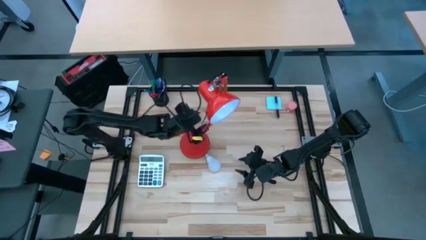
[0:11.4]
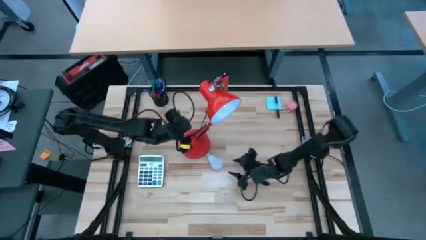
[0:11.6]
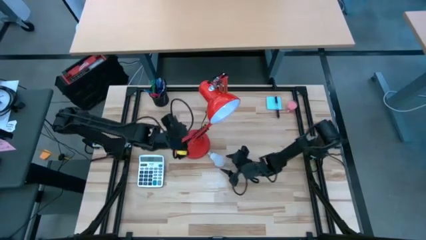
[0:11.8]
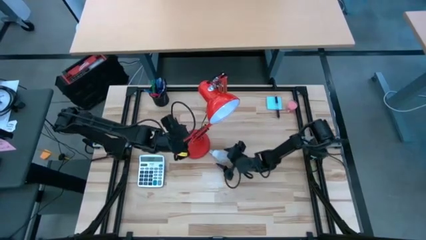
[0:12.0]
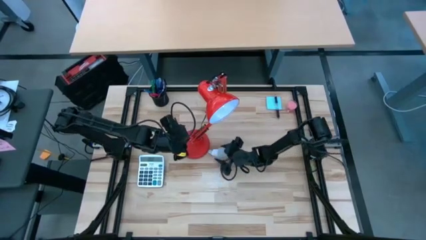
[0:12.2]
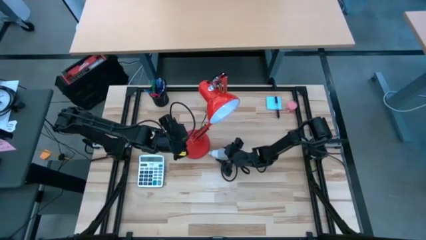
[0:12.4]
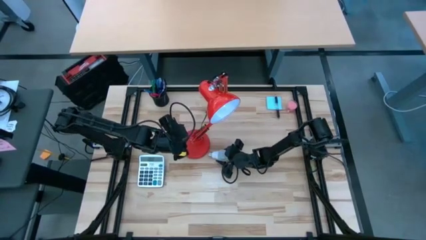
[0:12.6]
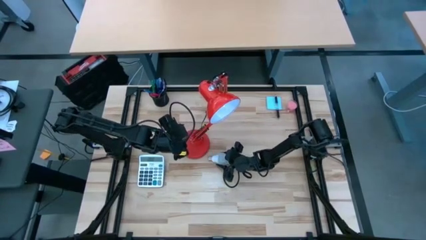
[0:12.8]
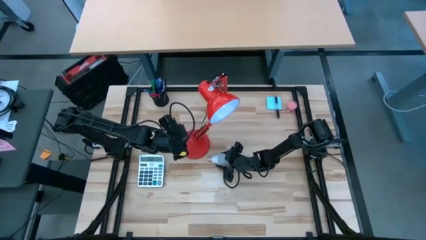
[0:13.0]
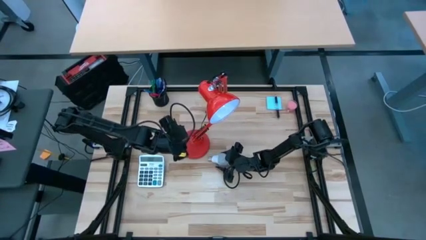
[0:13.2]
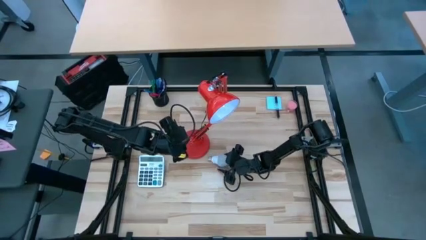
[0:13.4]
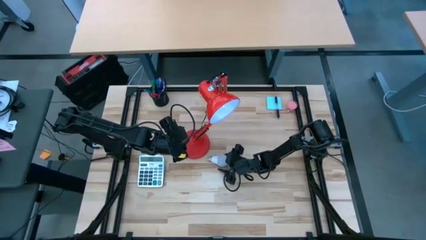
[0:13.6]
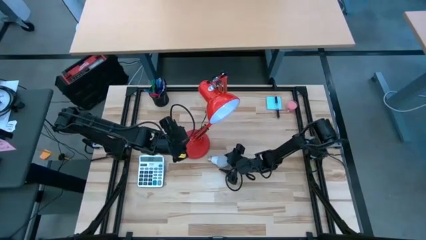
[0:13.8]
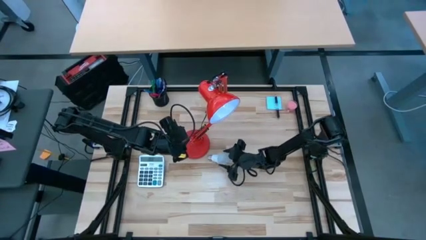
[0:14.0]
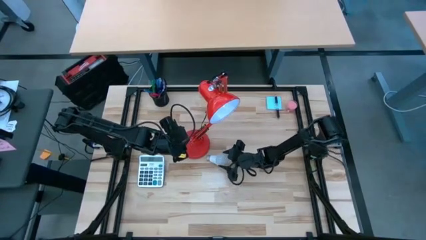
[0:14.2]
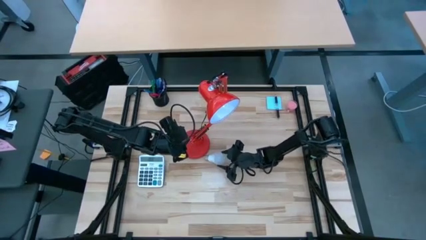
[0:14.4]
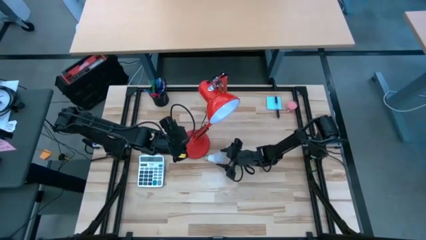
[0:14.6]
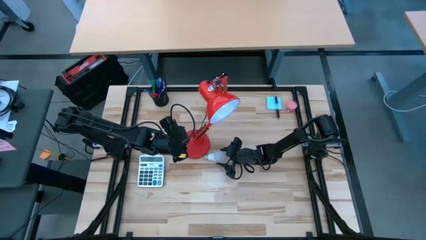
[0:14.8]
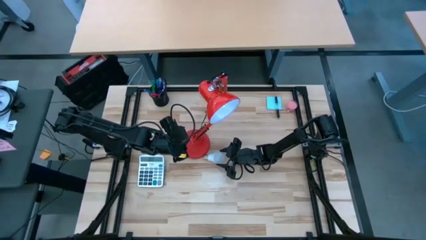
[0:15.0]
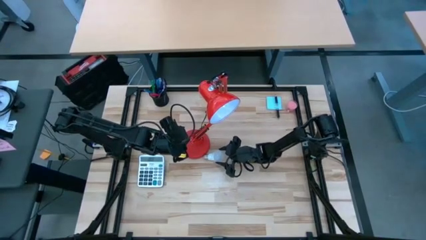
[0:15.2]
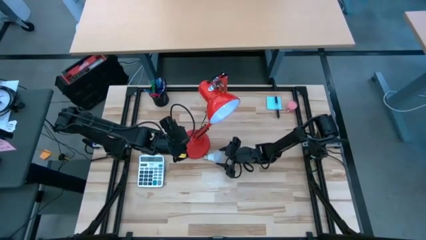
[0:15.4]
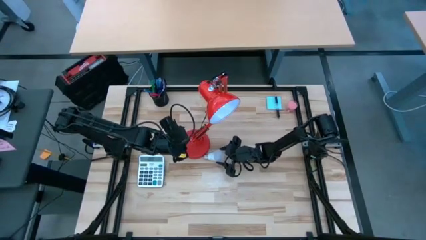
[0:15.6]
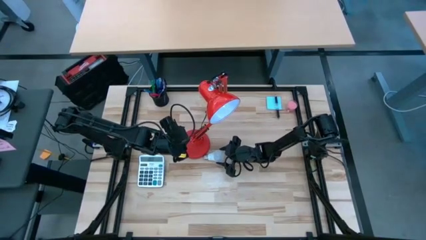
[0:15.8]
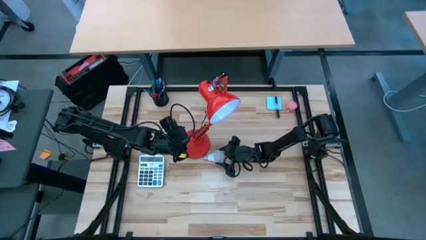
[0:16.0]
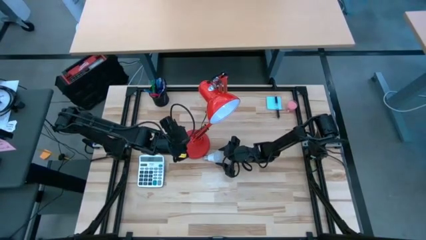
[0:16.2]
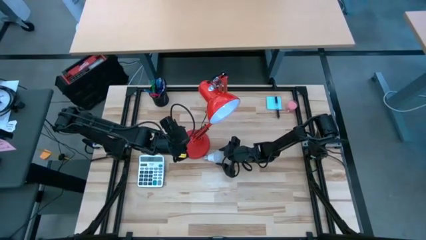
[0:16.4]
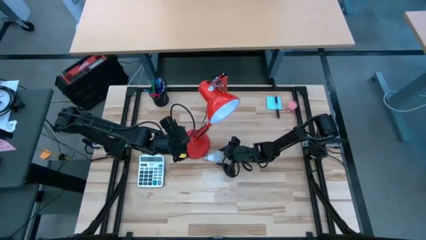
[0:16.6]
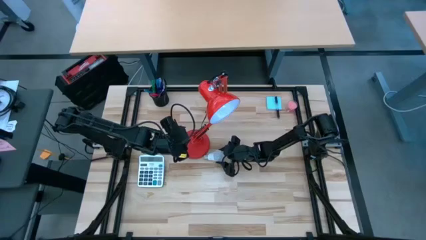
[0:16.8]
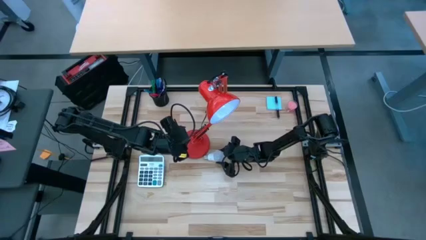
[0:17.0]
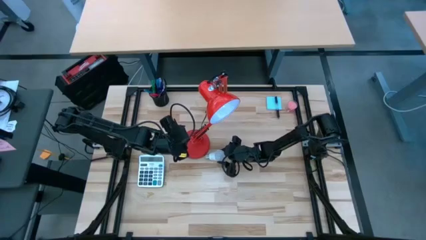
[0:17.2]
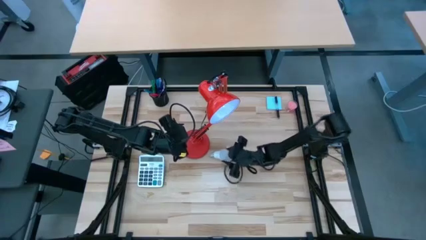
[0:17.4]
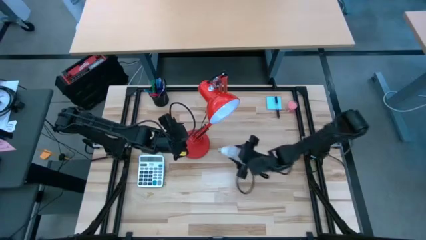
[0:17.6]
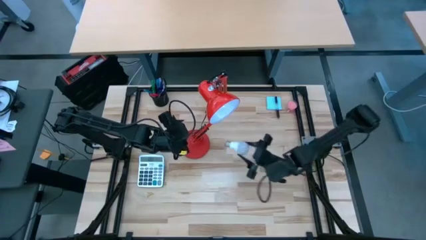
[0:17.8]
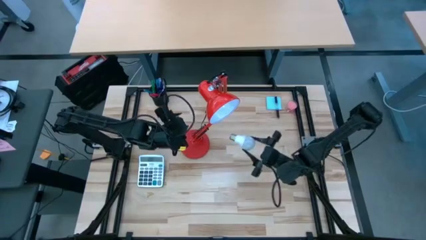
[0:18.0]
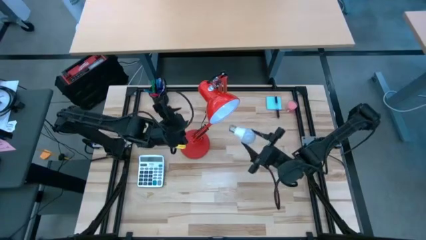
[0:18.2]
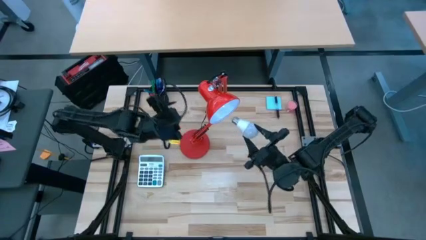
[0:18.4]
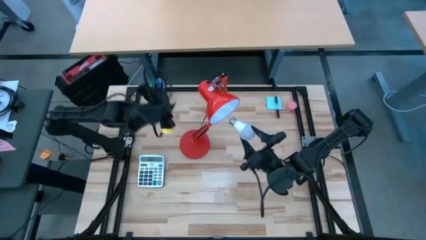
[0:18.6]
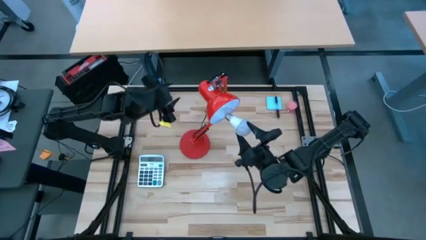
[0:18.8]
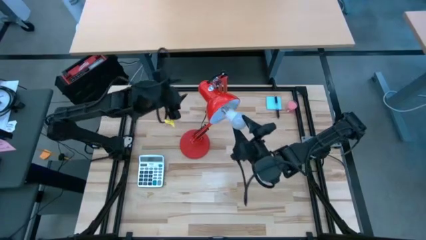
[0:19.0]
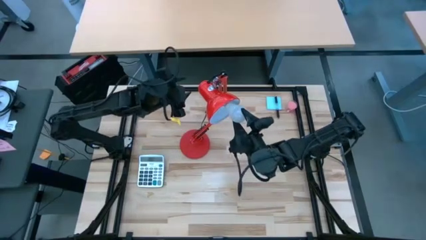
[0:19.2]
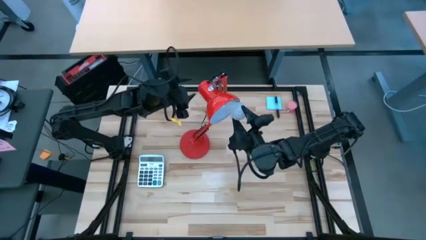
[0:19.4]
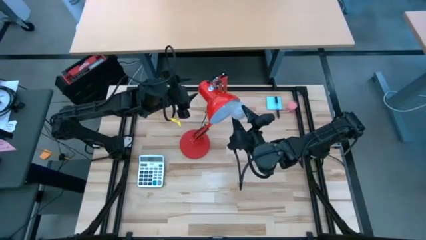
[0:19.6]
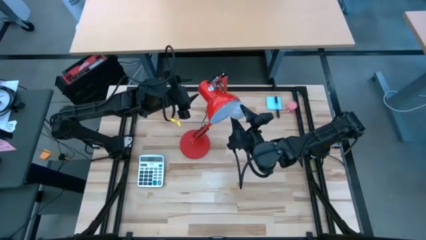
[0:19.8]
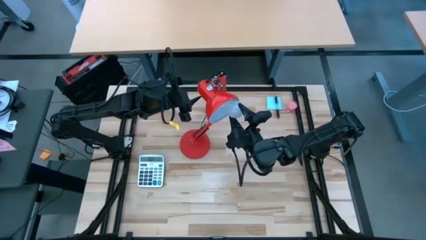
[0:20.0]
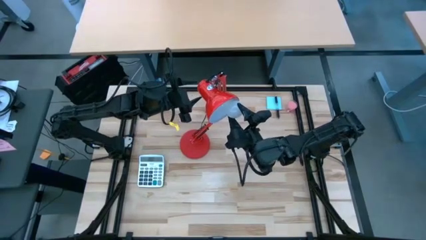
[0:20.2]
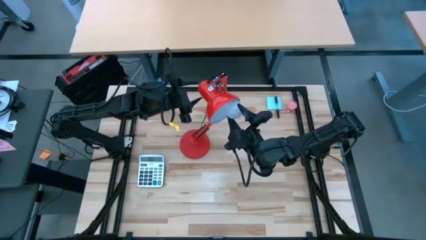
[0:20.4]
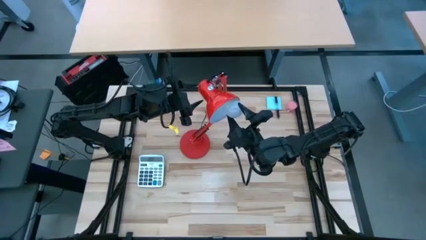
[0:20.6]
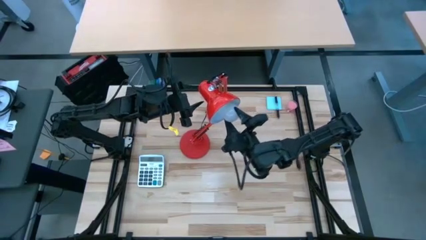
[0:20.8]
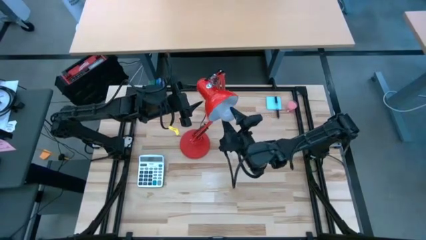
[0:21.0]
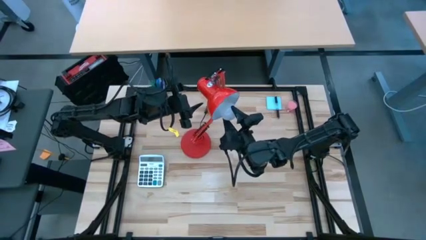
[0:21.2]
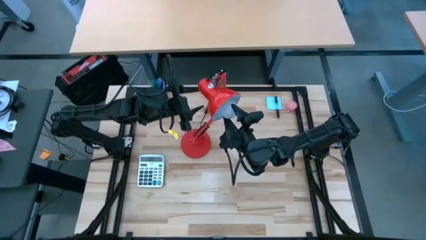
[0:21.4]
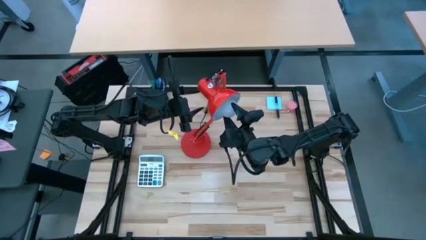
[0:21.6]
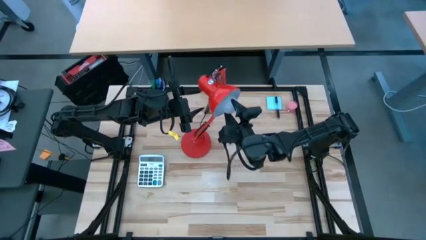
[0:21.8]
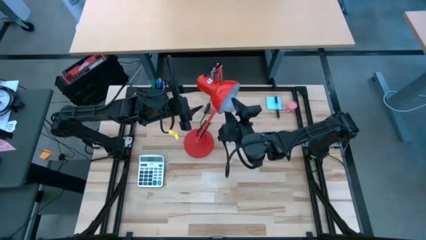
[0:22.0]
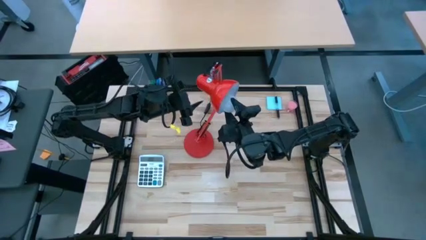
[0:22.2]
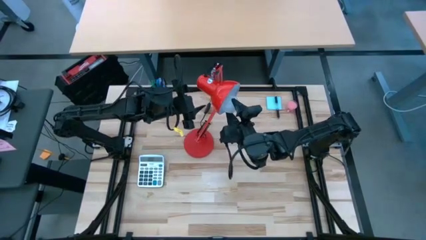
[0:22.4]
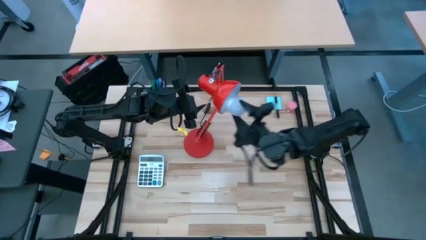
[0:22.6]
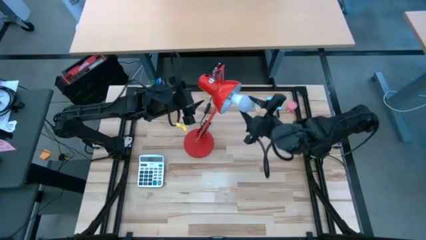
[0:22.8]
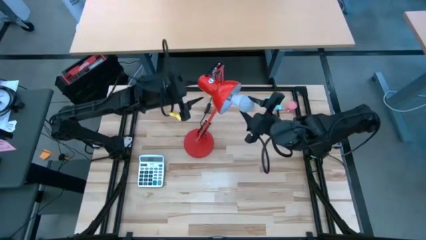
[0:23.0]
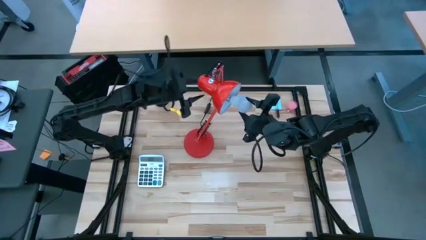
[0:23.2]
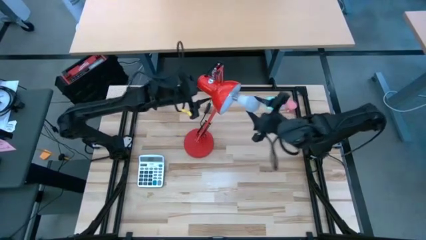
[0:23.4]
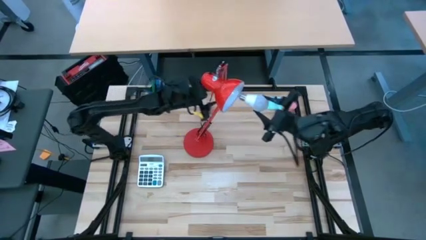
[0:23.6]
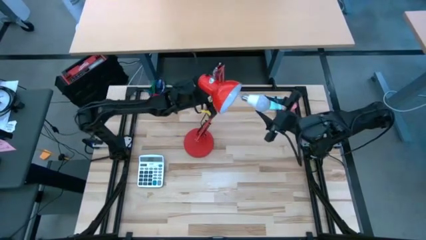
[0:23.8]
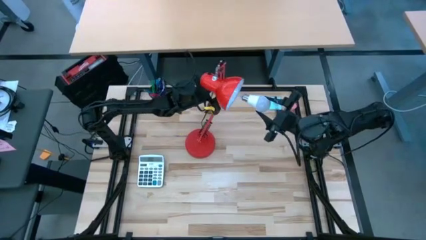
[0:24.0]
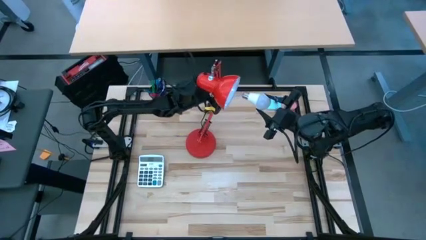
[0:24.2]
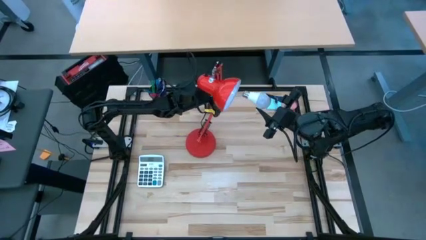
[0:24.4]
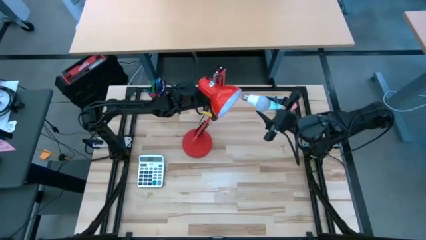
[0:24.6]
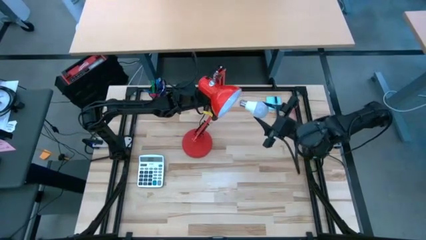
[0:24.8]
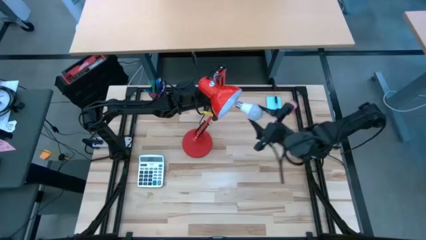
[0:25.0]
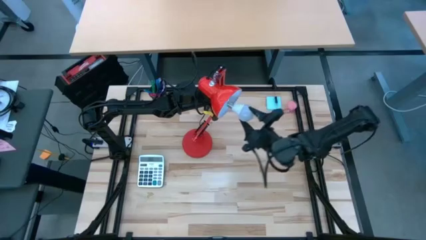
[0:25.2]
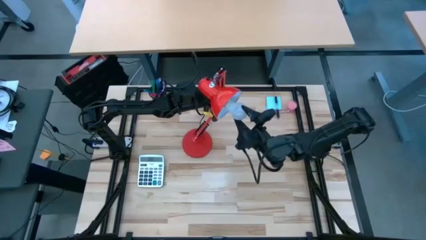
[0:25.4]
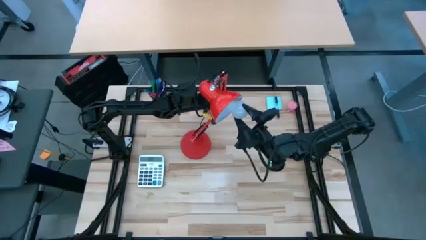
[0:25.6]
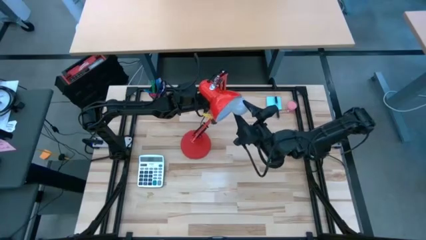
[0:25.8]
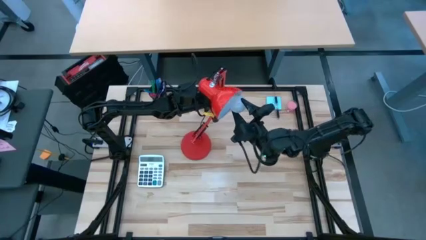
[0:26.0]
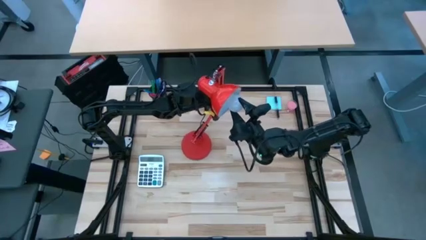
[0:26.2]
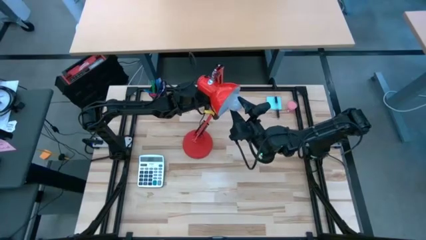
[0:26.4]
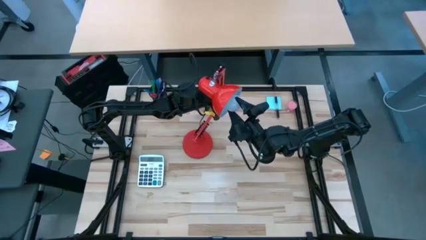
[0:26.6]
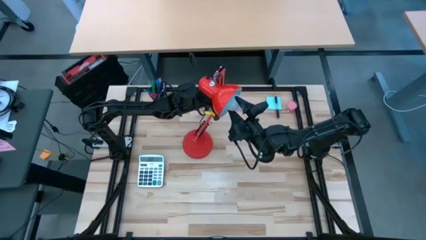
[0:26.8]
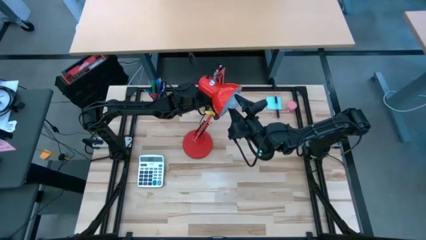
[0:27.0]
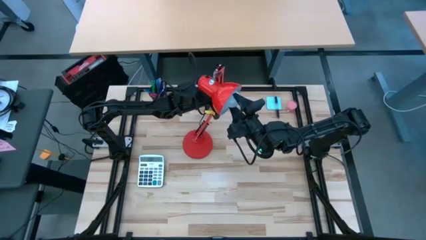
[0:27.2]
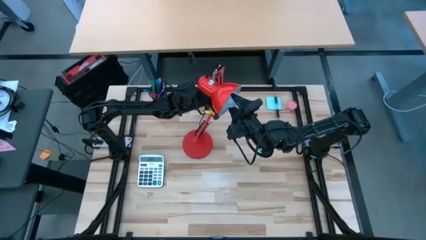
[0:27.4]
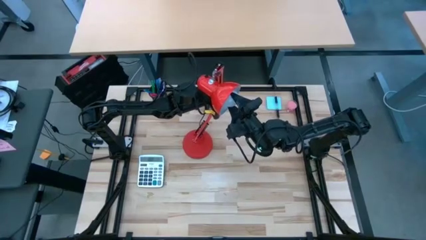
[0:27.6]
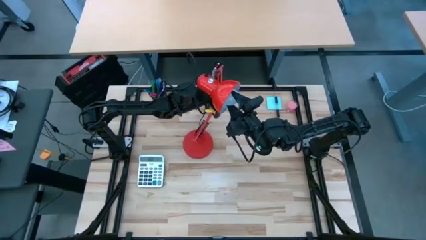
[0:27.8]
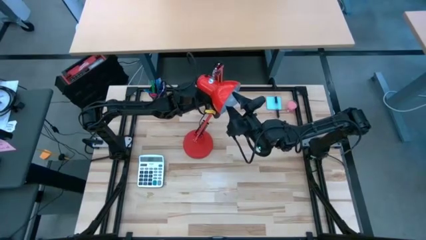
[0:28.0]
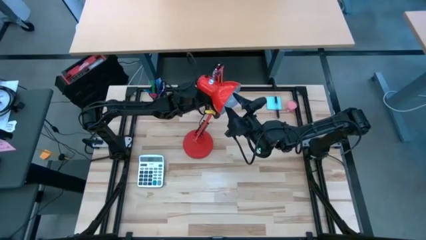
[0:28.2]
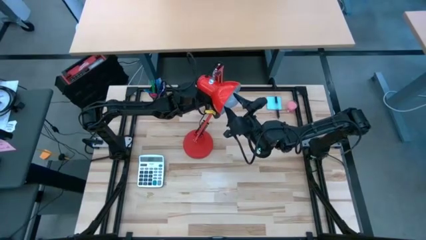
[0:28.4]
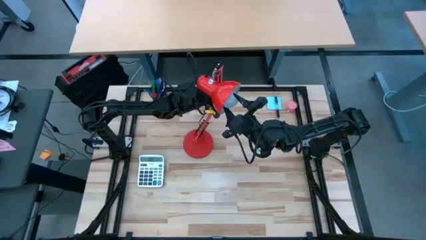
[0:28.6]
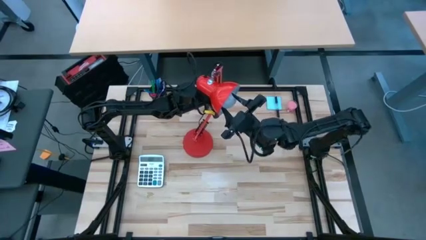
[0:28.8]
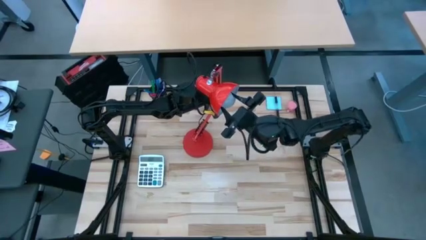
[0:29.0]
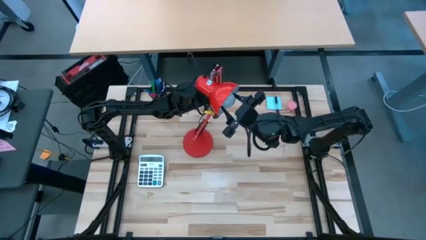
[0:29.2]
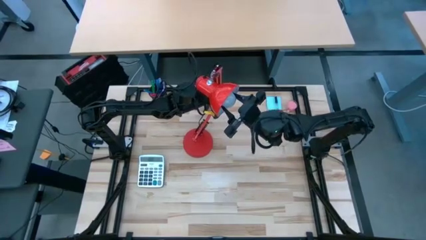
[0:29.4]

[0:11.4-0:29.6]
Task: Screw lightbulb
Insert the white lightbulb into the red desk lamp
